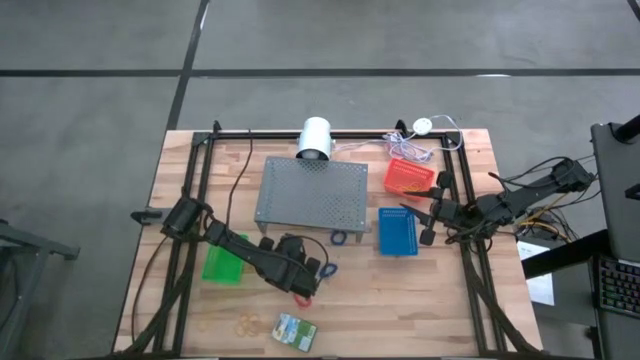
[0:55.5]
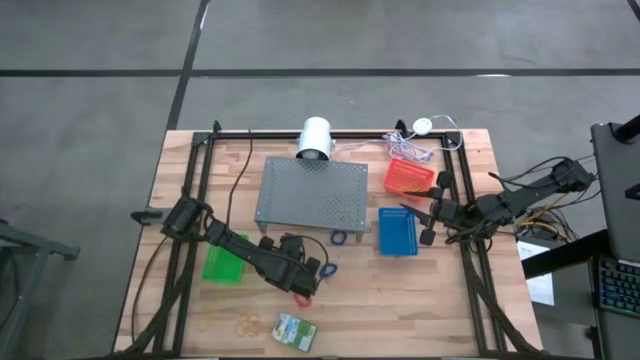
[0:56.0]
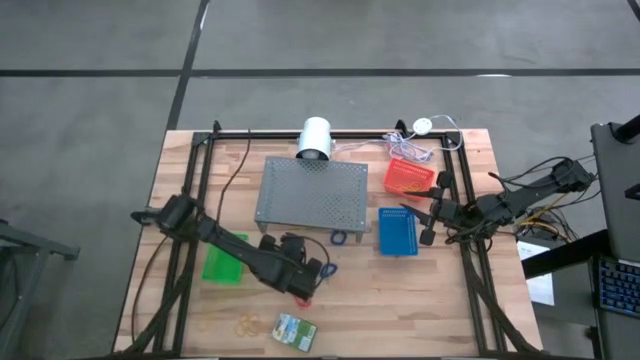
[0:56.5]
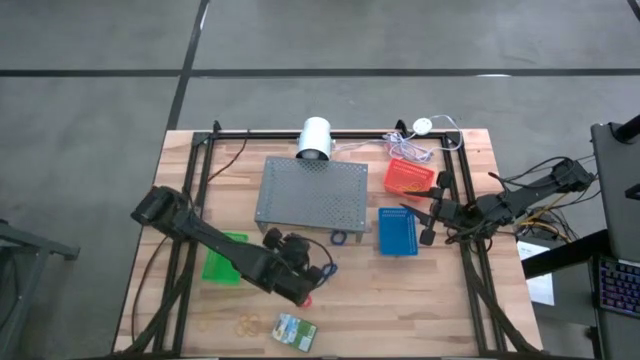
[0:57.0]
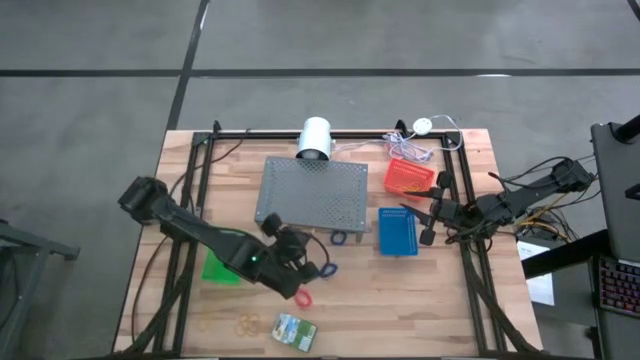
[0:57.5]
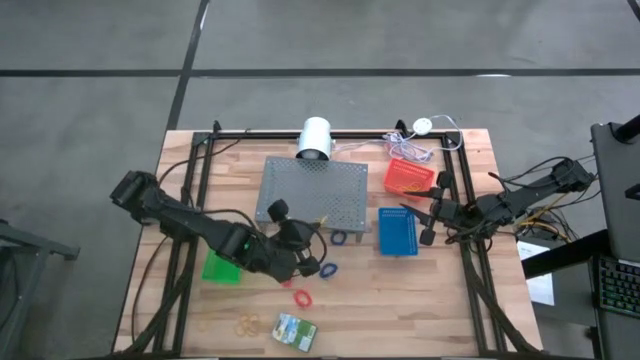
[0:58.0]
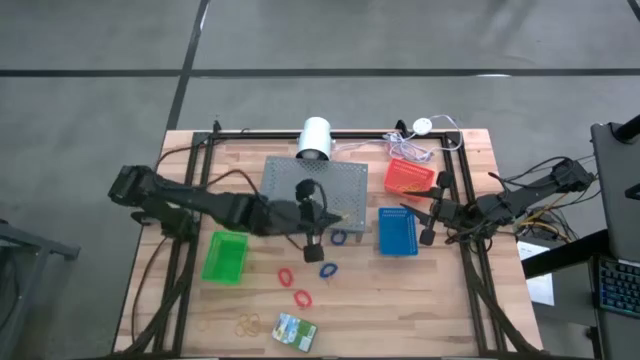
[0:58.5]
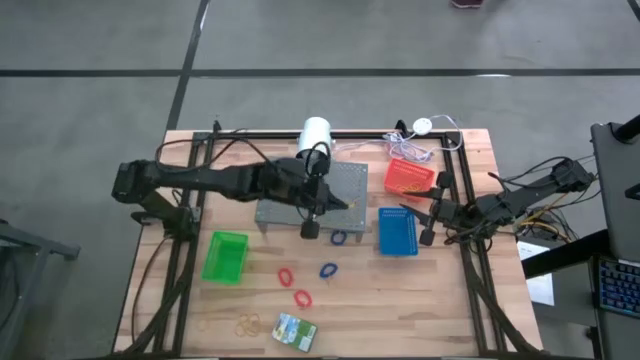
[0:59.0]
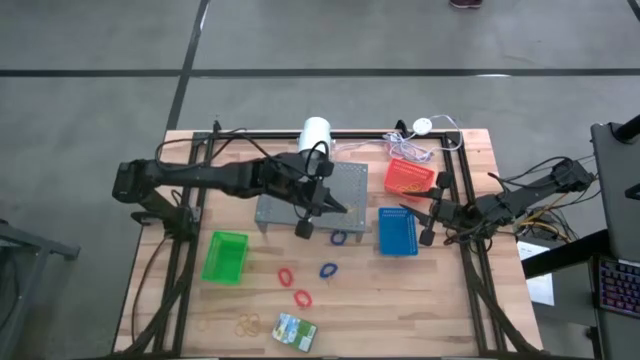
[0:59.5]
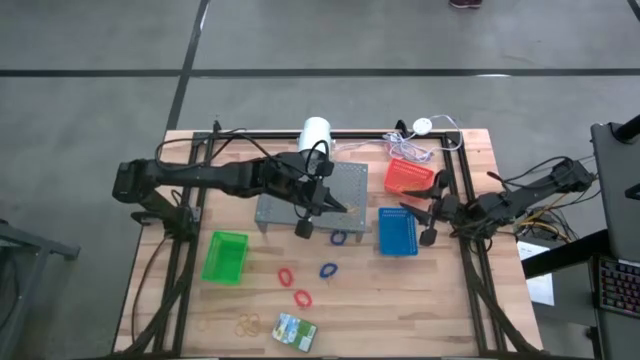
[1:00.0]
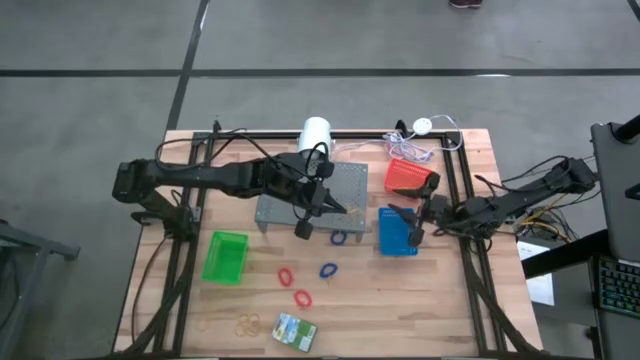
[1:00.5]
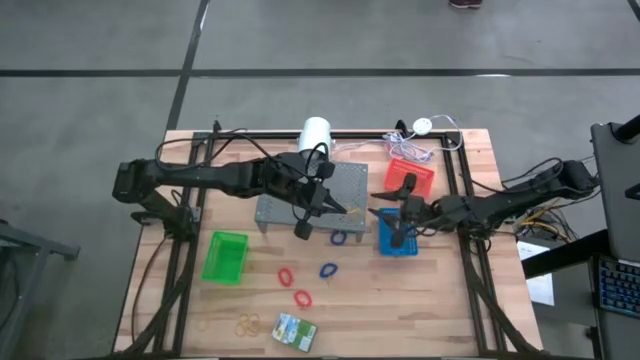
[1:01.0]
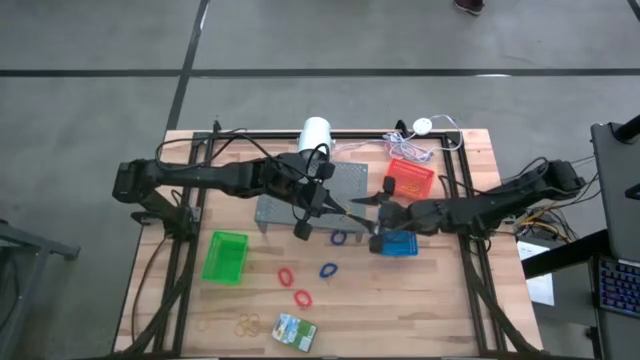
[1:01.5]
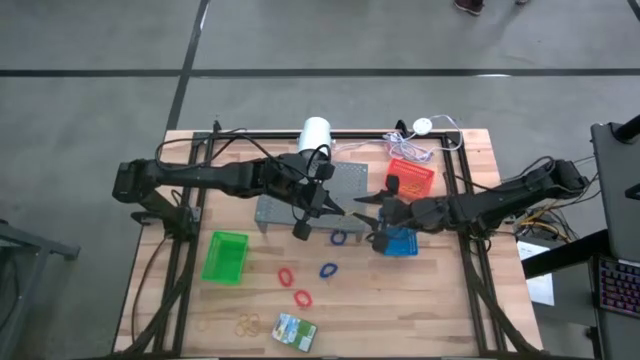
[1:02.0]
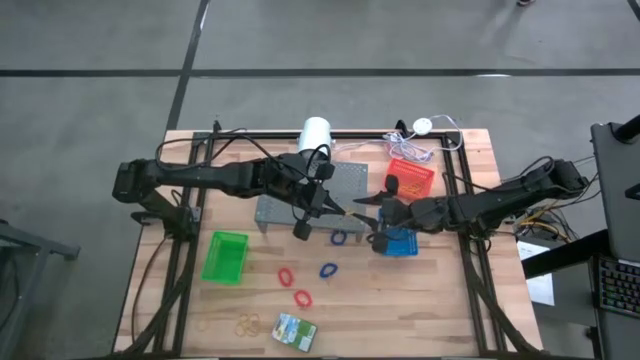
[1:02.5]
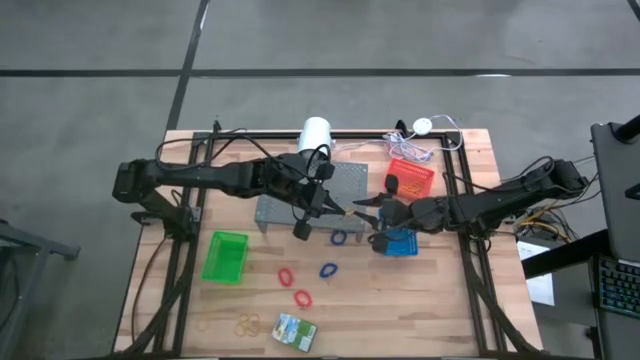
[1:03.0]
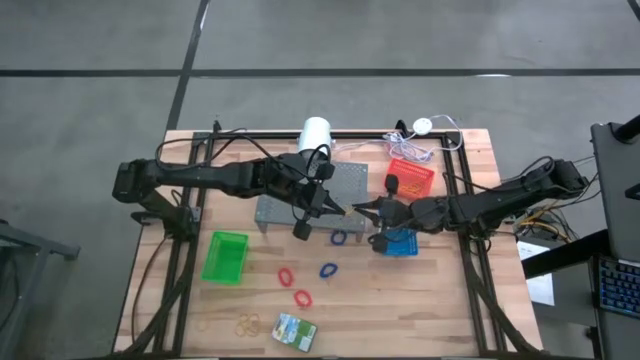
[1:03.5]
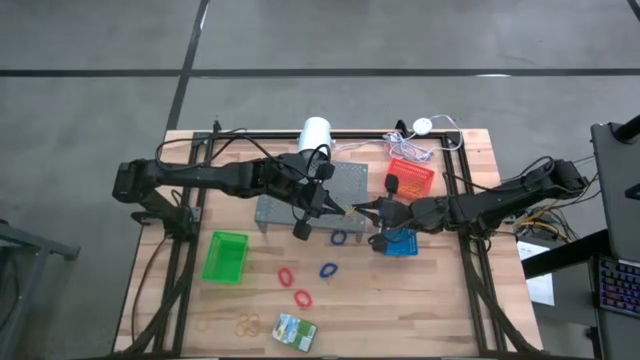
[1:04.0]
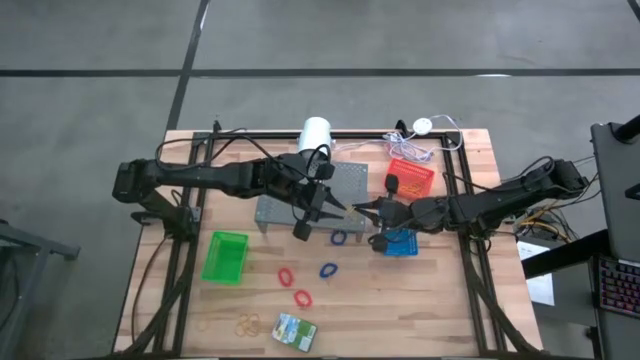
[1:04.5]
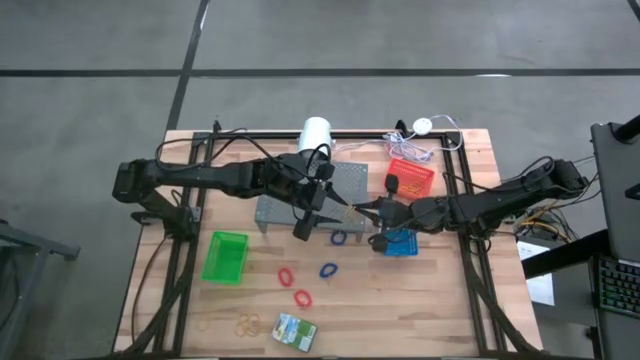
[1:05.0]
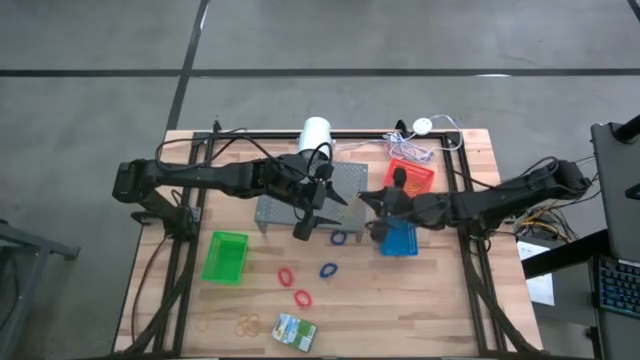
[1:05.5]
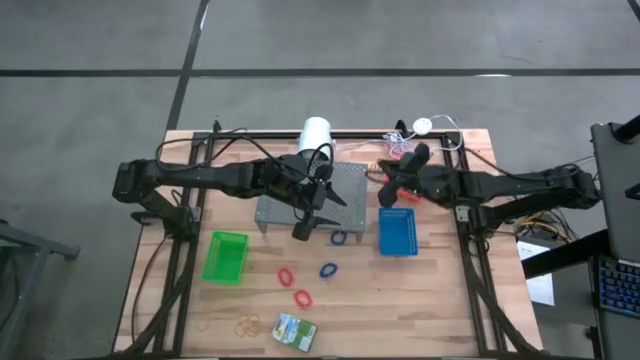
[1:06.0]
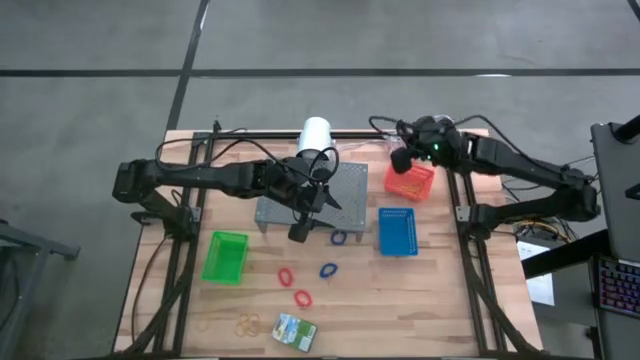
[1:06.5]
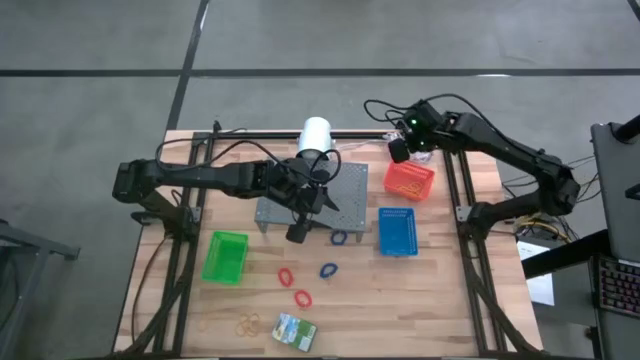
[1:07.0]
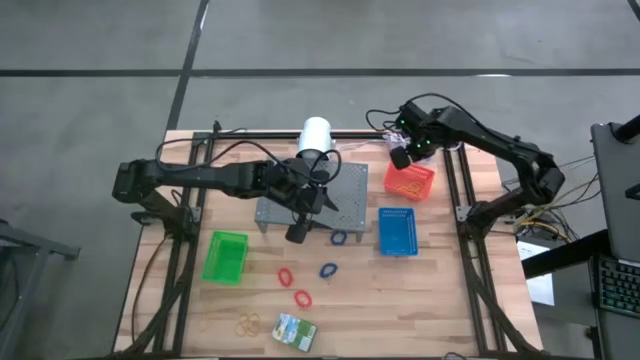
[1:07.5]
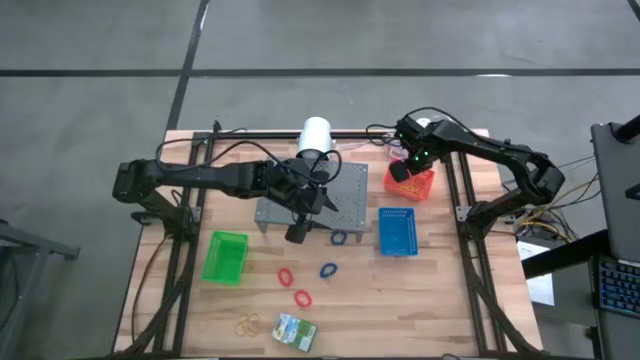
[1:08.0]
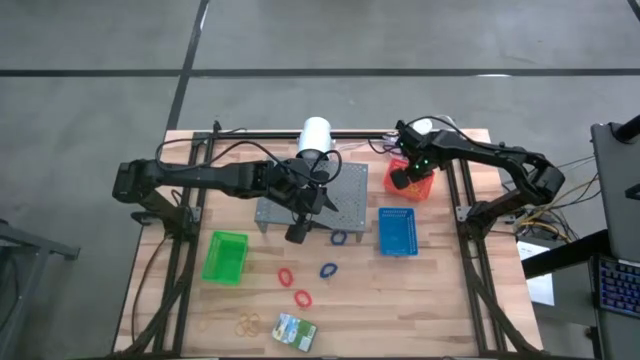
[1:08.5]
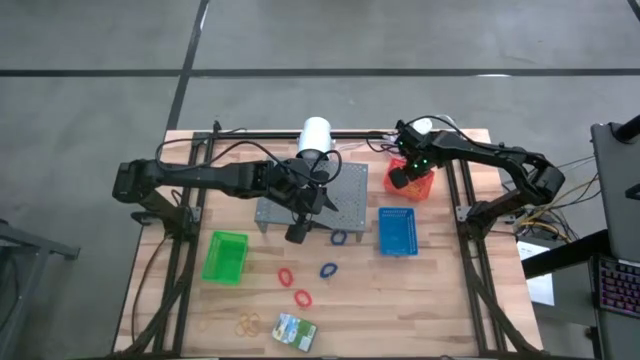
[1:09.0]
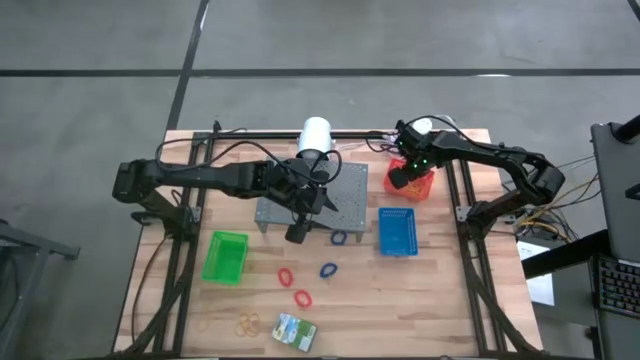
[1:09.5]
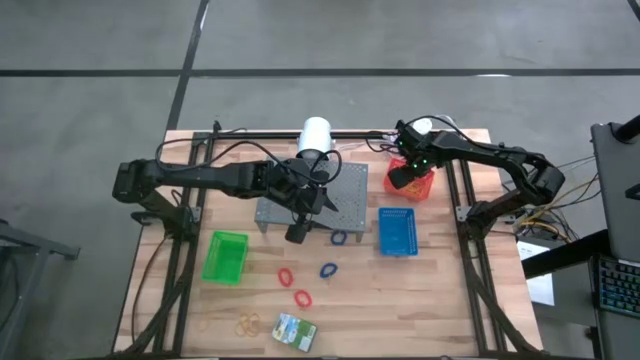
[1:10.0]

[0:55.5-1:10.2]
Task: Pick & Place Office Desk Supplies
Put the yellow rubber band into the orange bin

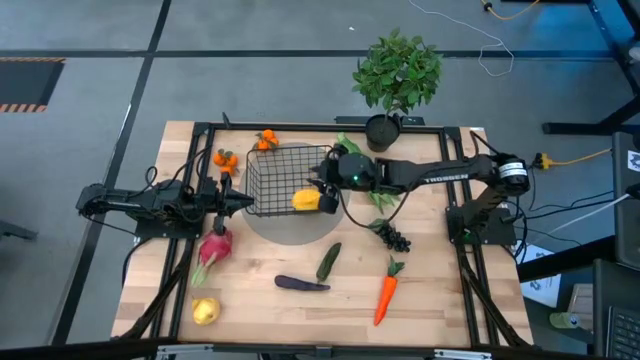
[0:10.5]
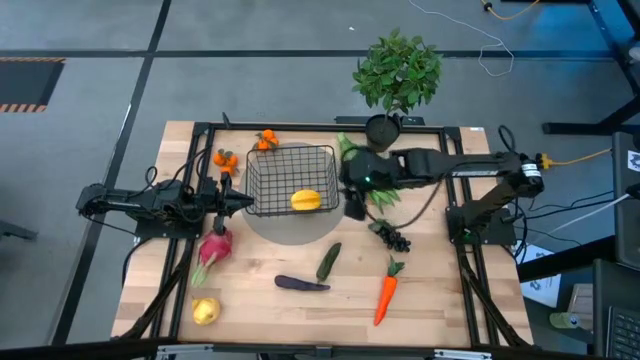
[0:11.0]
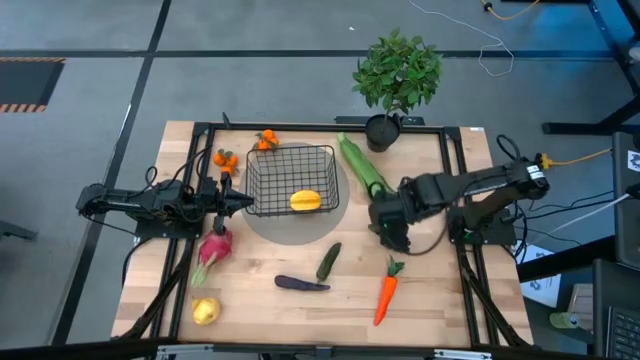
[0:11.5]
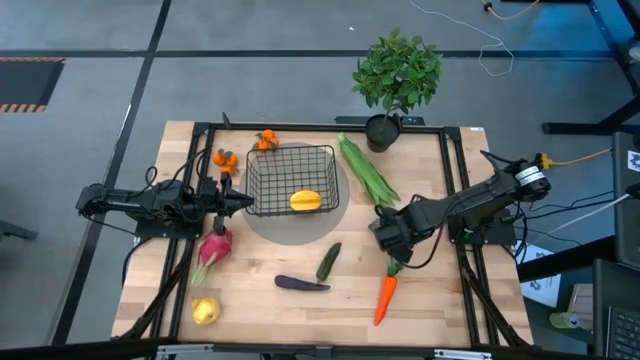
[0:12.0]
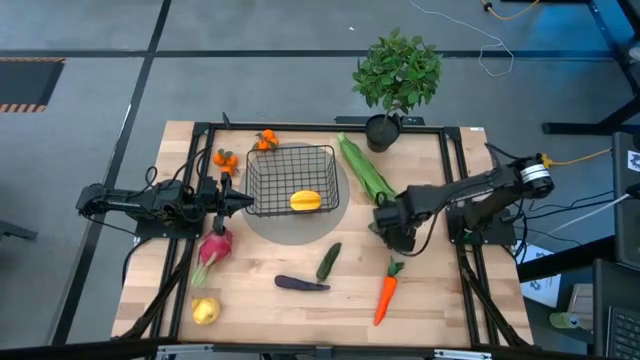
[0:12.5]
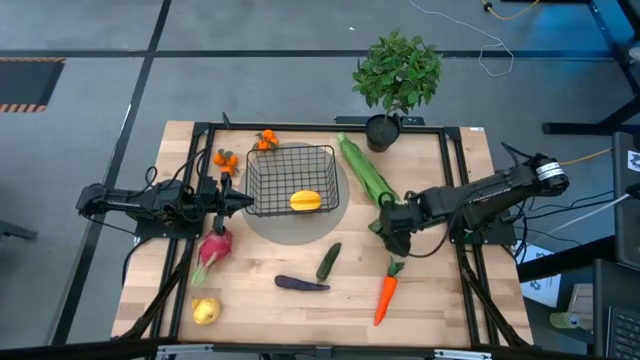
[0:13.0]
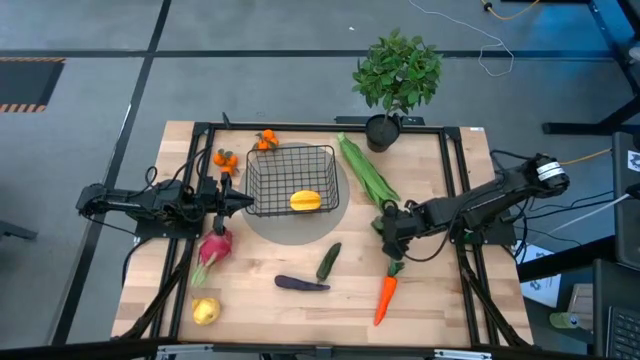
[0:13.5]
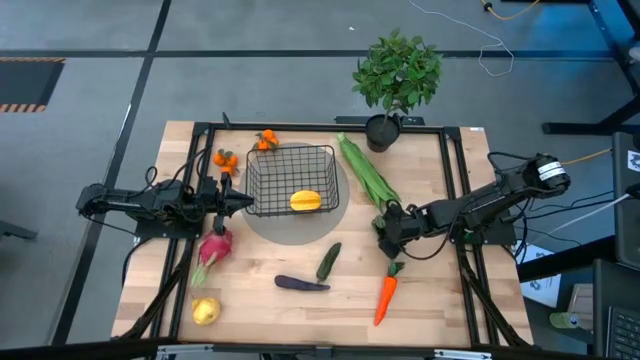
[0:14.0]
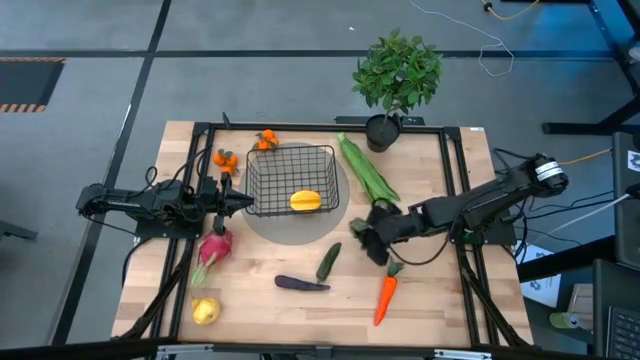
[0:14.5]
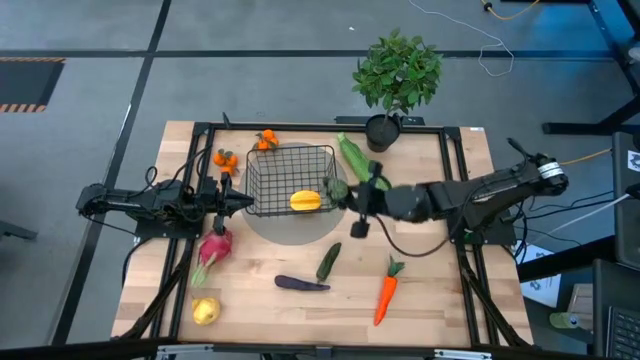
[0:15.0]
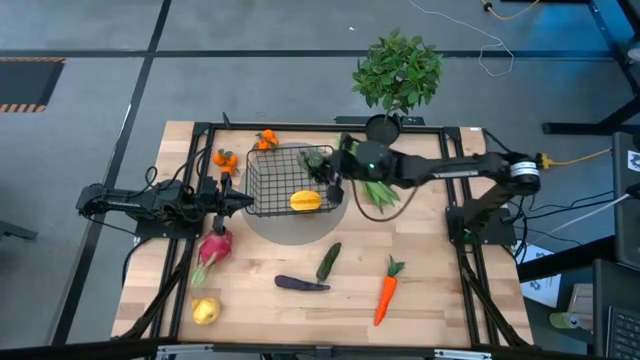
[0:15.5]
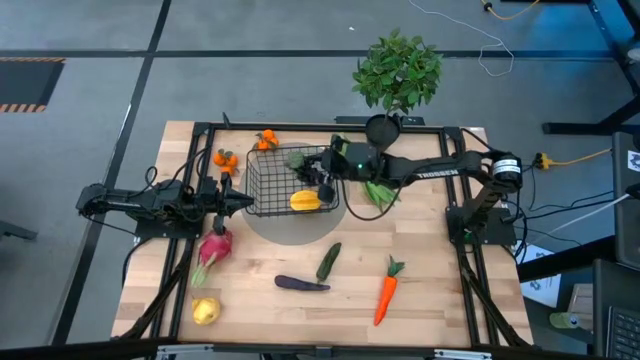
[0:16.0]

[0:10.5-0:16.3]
Task: Build produce basket
Put the dark purple grapes into the black wire basket
